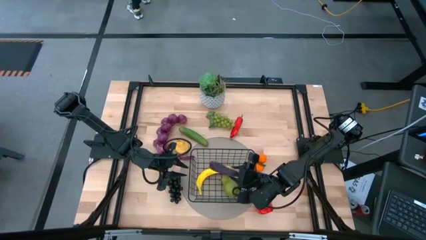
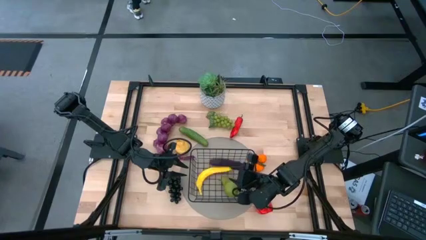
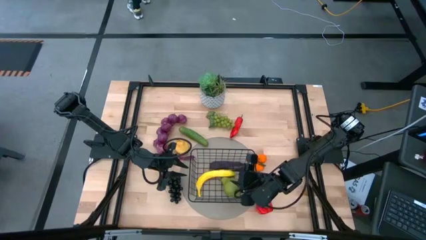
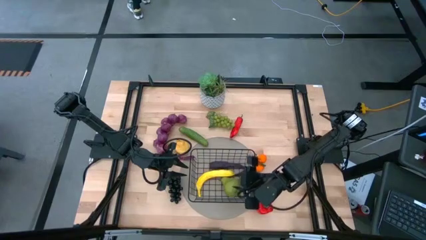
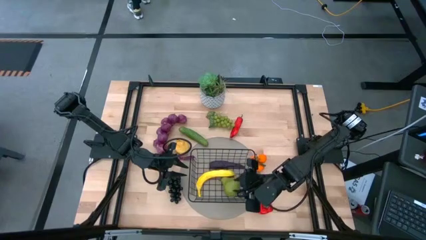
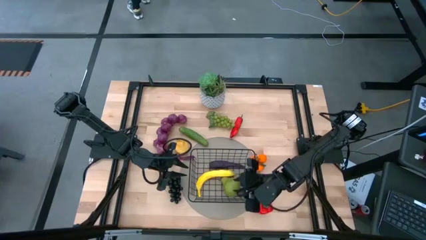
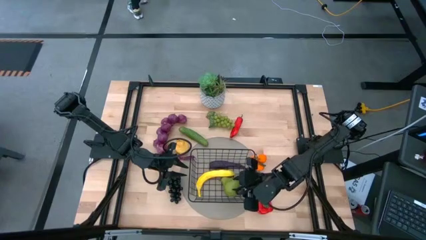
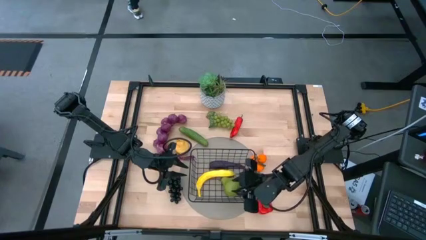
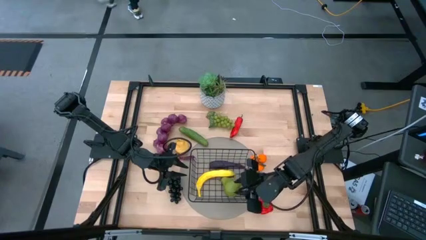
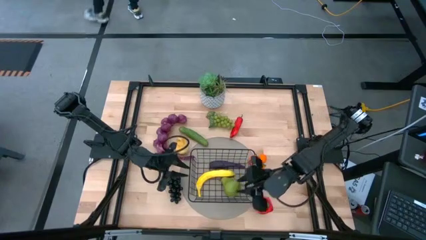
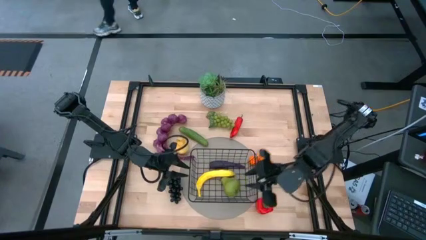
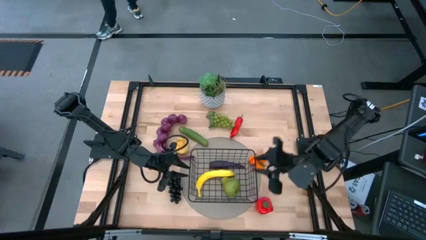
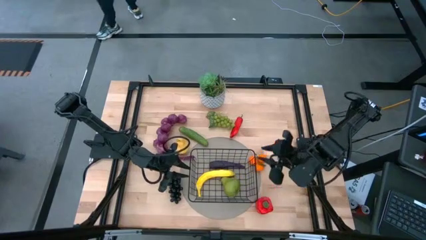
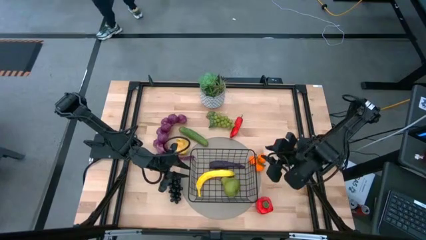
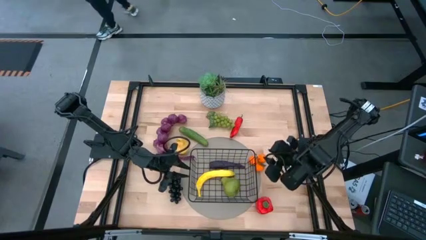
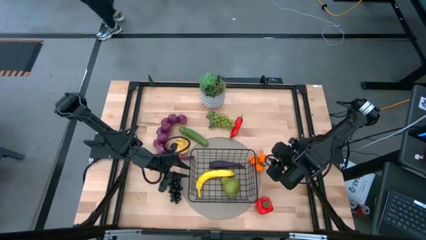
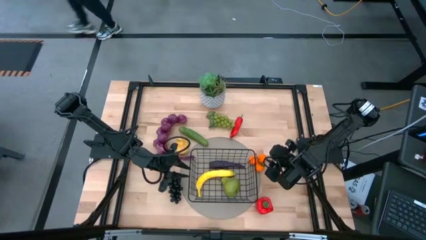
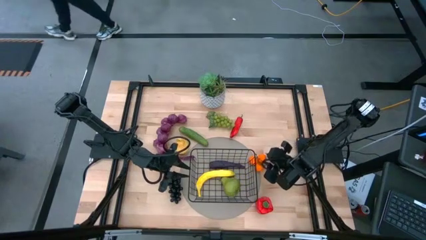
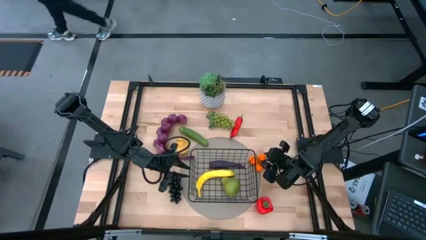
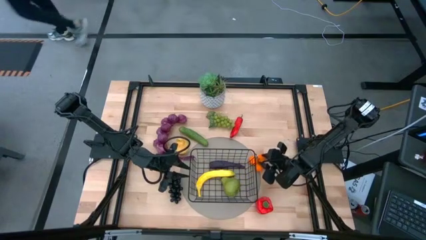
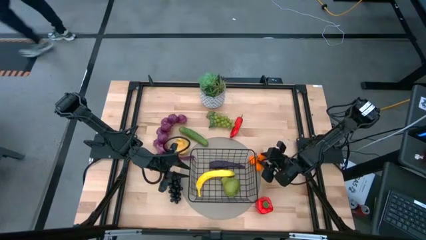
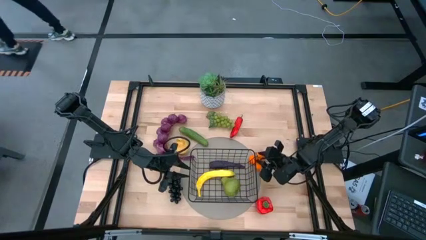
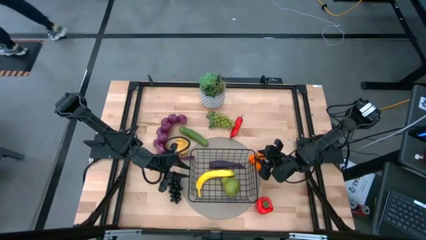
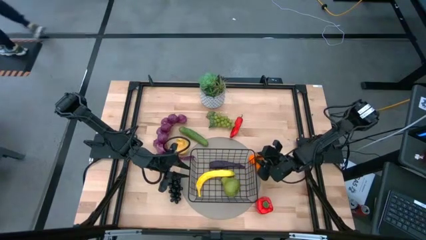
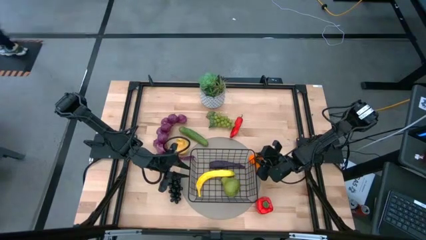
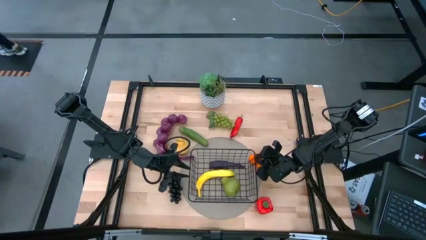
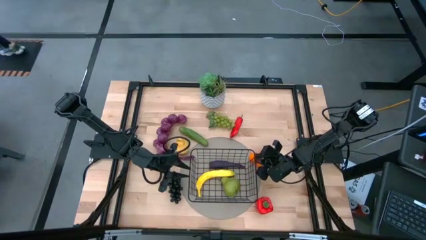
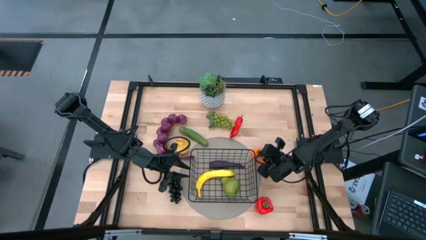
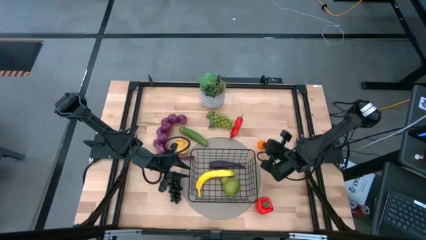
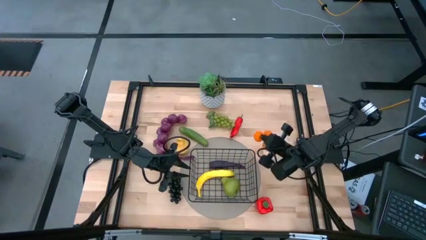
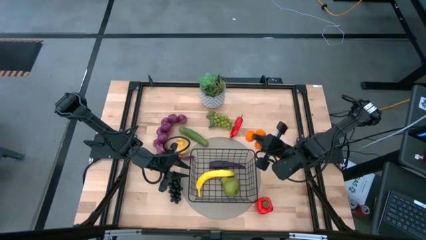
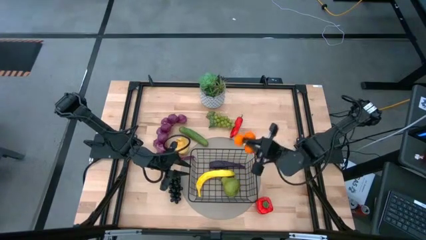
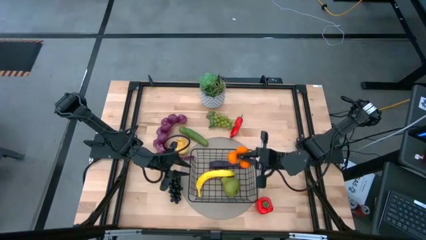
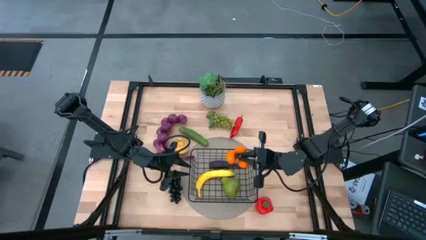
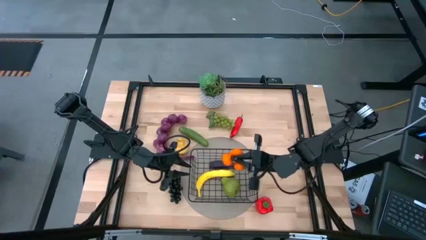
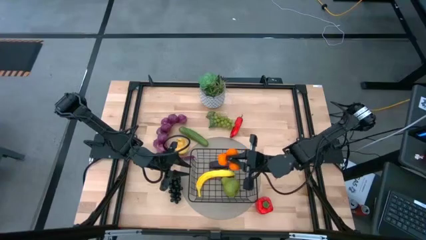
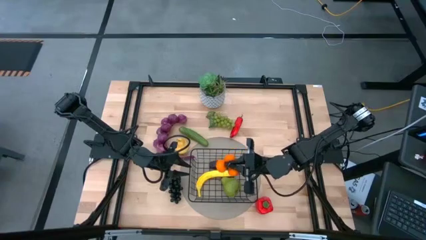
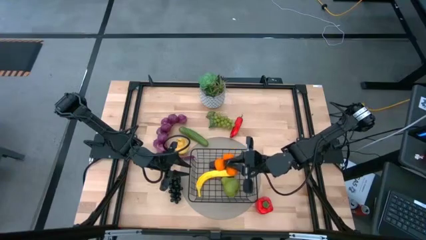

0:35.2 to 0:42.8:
Task: Build produce basket
Put the orange tangerines into the black wire basket

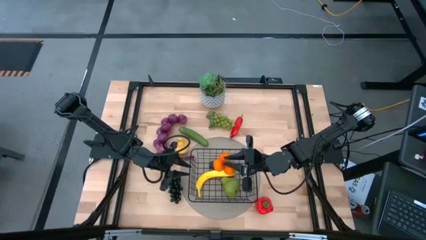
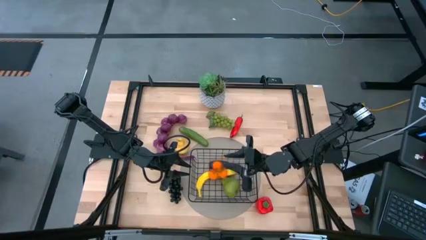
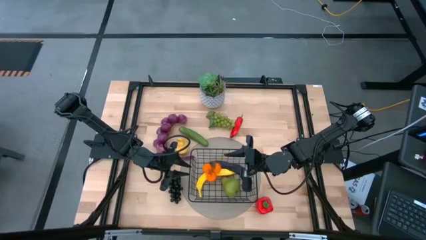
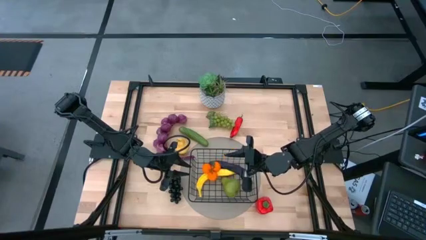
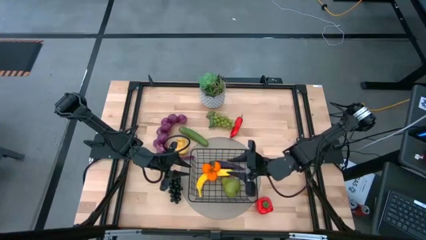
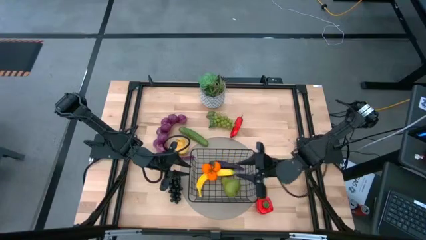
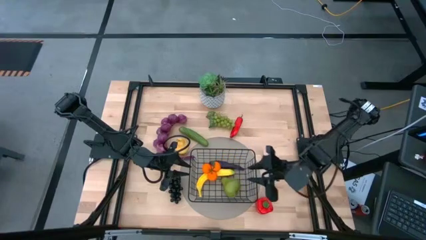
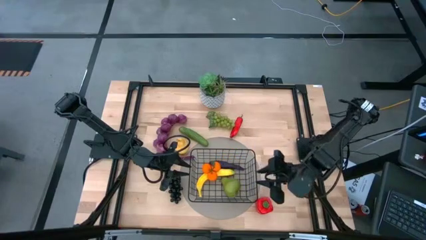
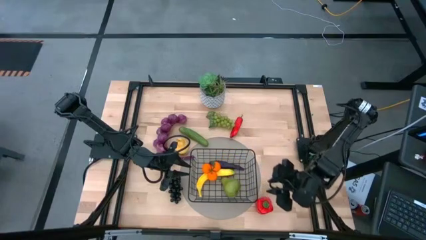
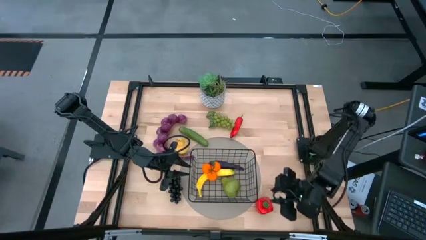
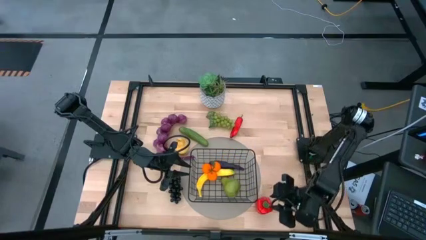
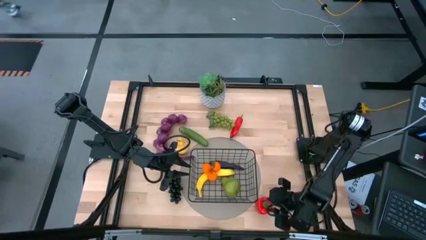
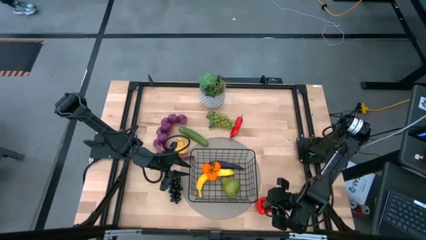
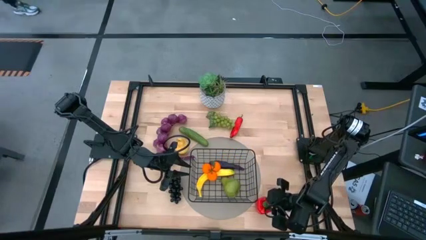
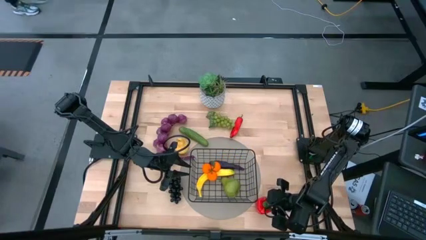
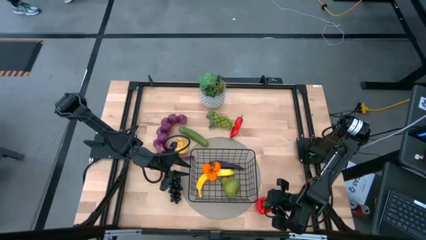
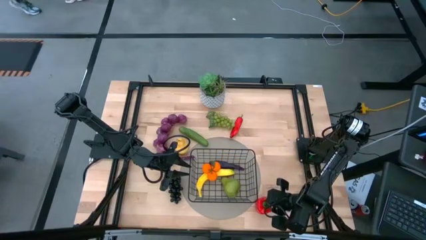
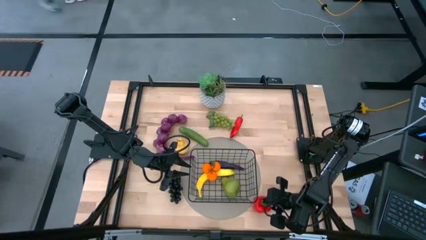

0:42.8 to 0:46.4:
Put the red bell pepper into the black wire basket

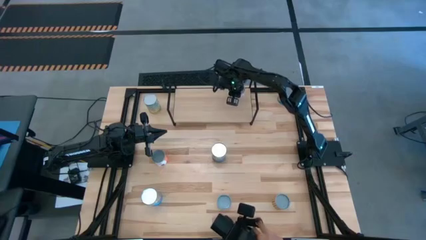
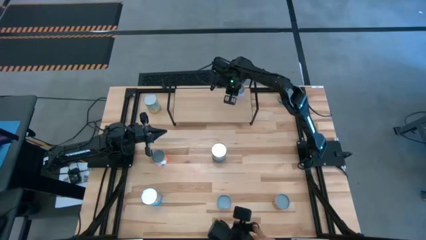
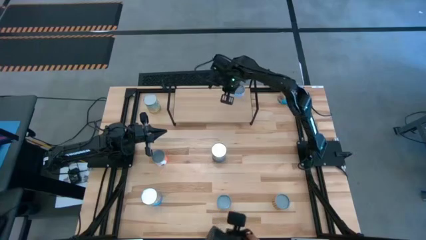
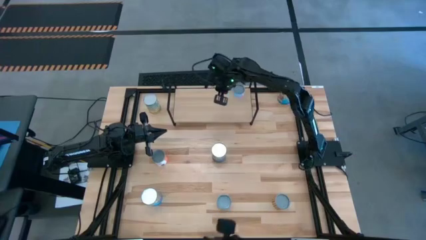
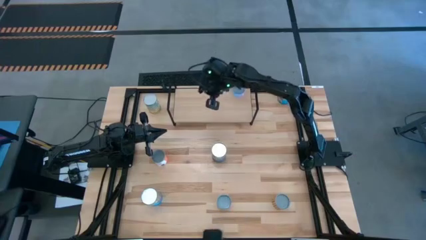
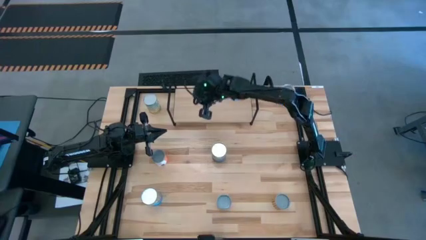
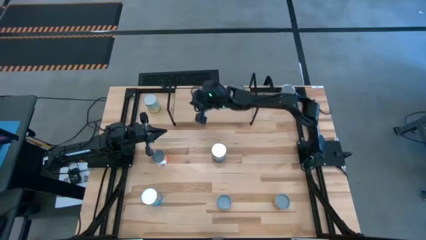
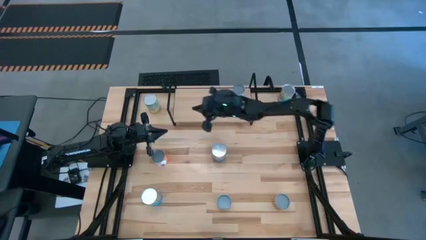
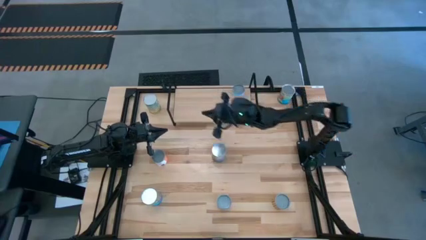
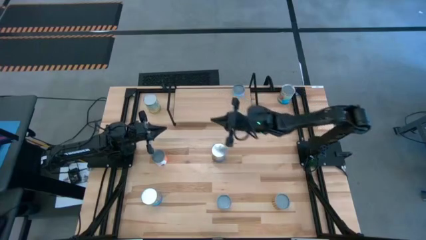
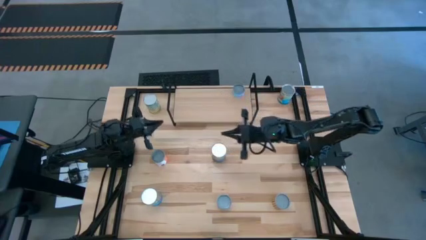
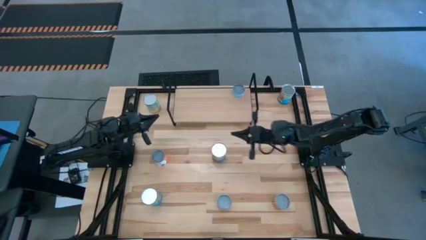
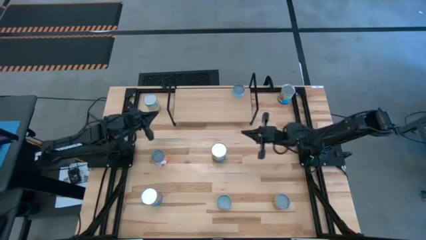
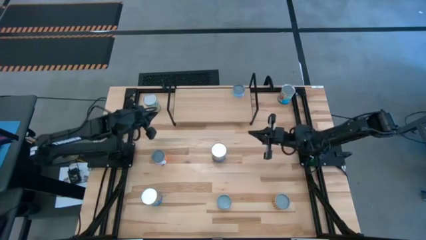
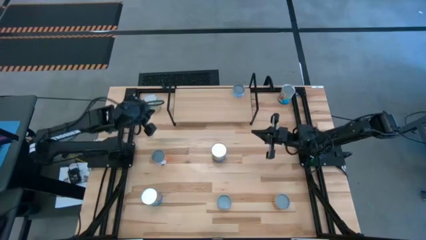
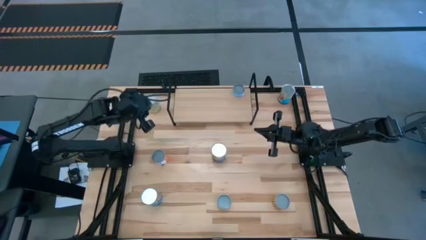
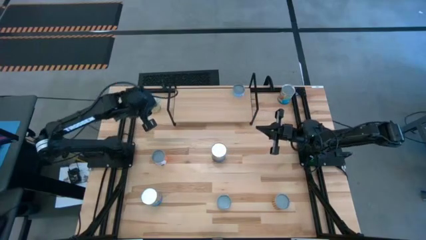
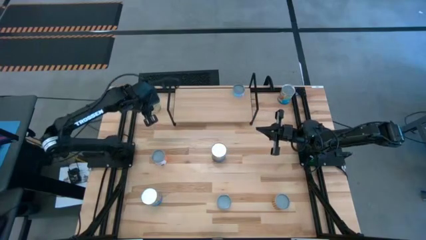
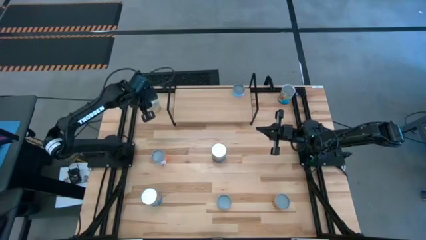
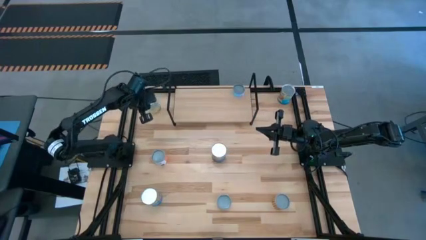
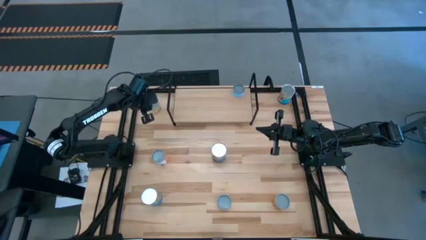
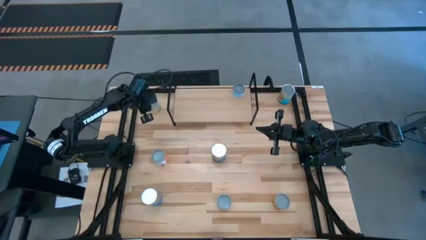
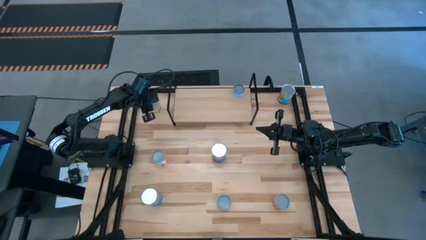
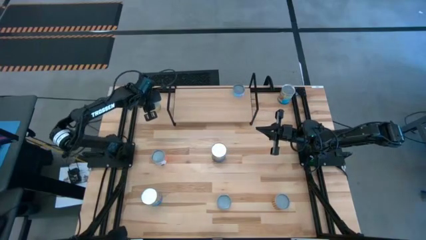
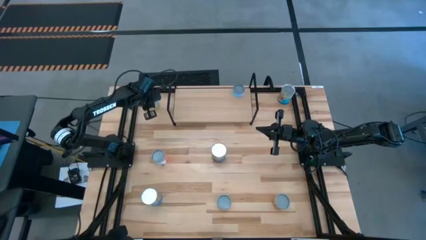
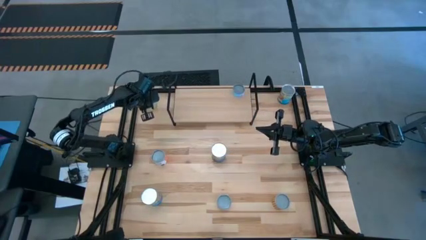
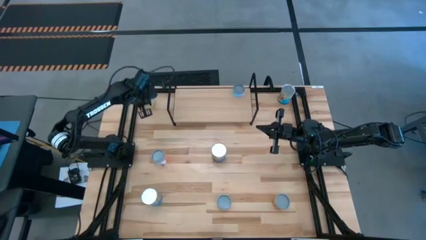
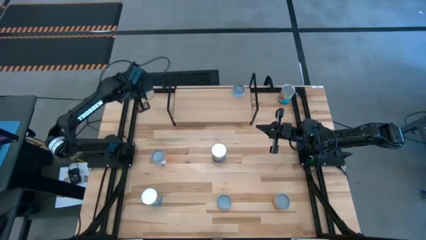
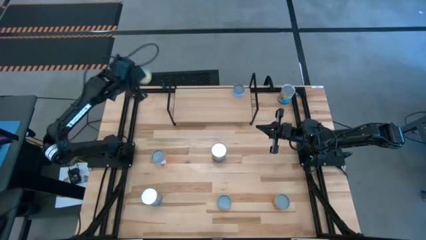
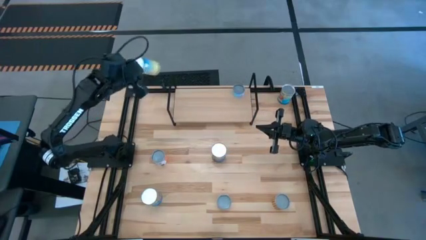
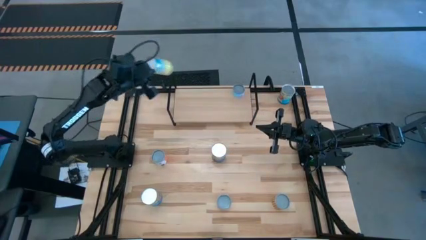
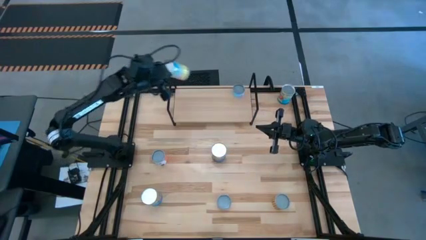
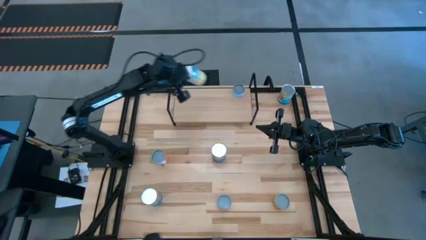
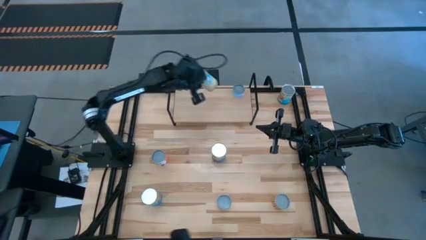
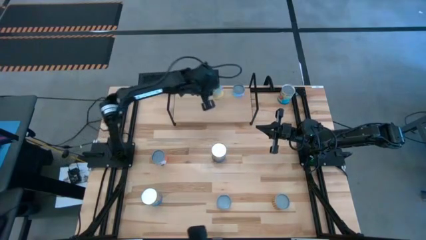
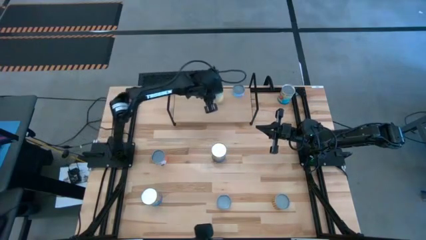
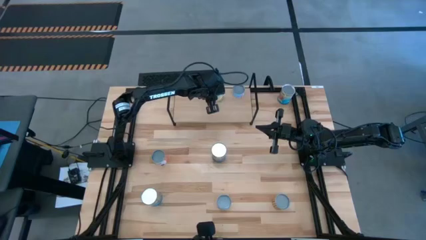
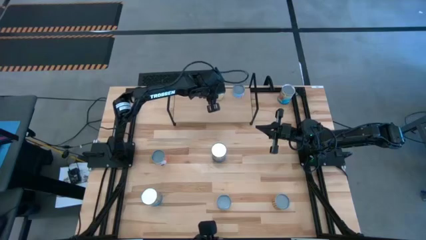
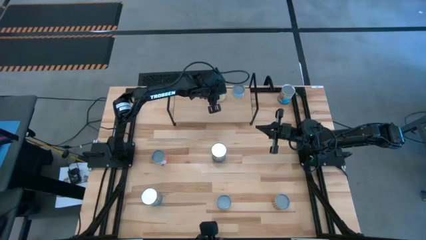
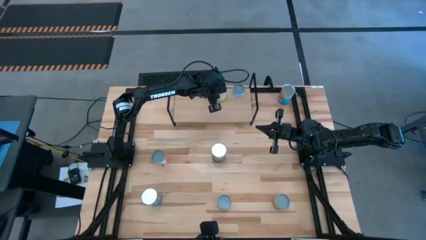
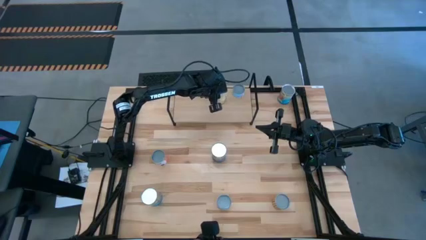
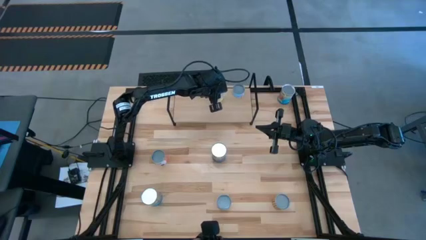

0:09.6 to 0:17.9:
Task: Pick and place cans onto a shelf
Put the canned carrots on the shelf
